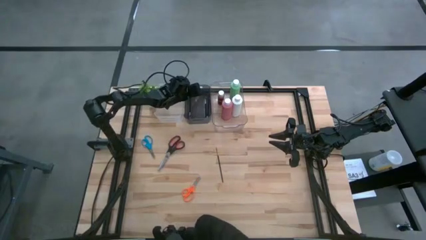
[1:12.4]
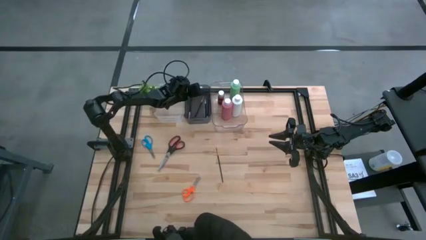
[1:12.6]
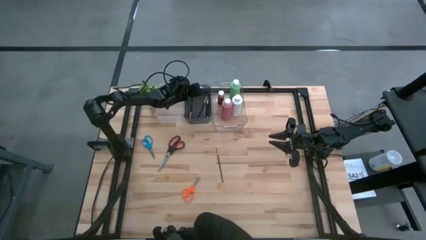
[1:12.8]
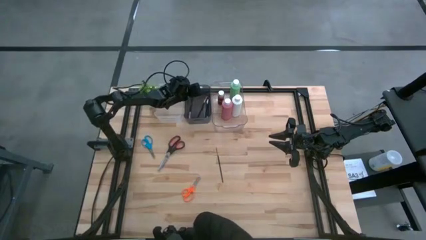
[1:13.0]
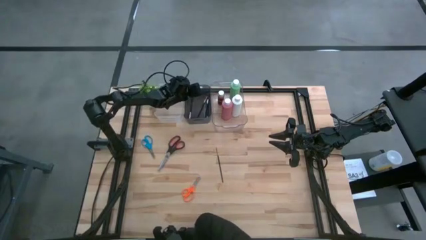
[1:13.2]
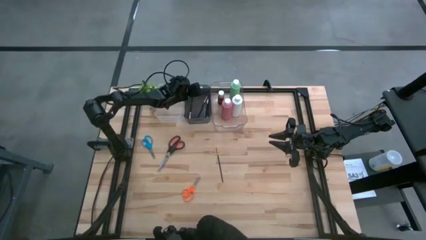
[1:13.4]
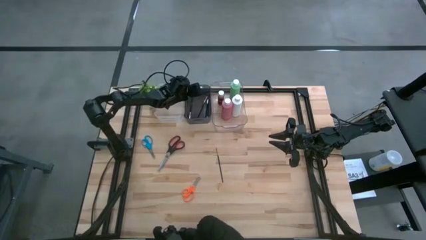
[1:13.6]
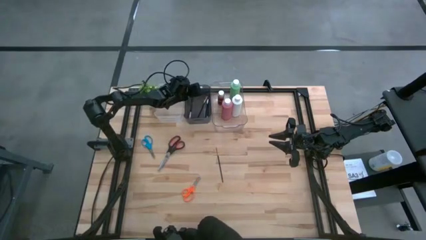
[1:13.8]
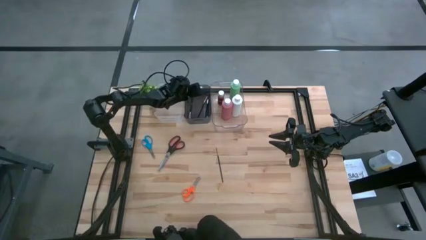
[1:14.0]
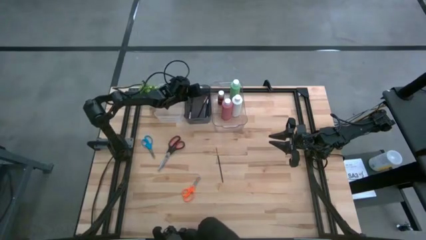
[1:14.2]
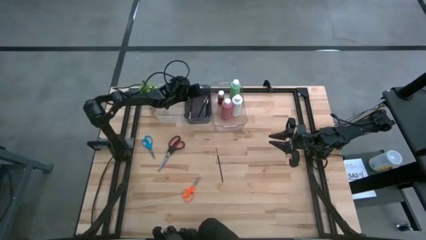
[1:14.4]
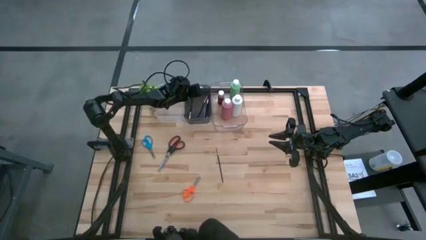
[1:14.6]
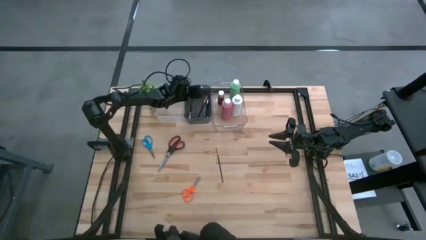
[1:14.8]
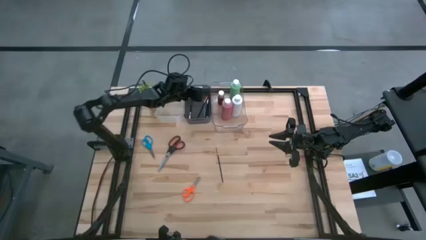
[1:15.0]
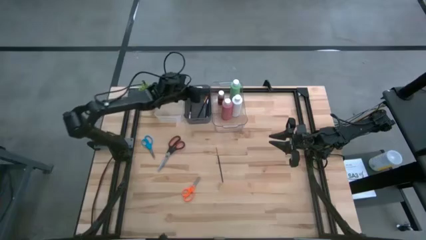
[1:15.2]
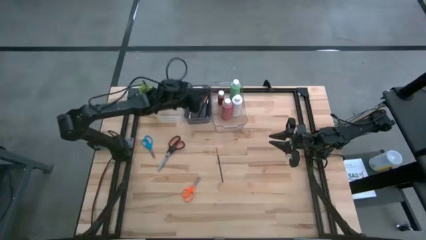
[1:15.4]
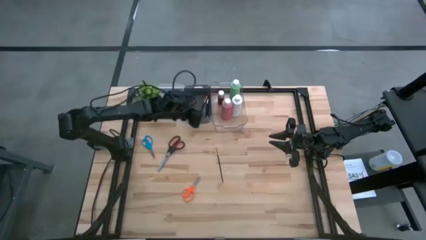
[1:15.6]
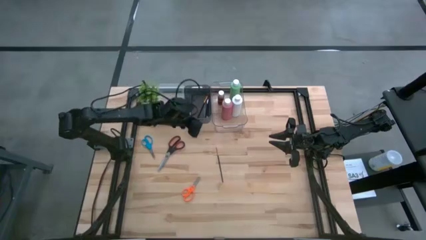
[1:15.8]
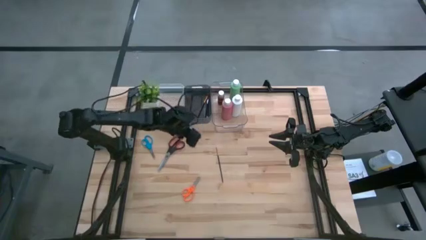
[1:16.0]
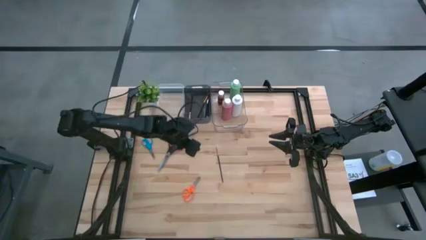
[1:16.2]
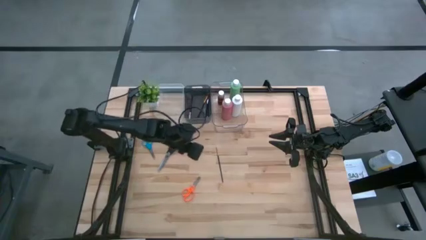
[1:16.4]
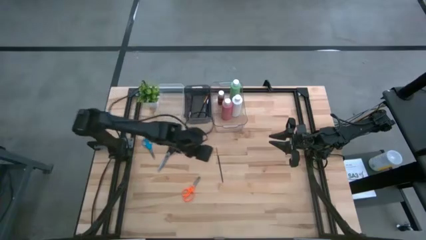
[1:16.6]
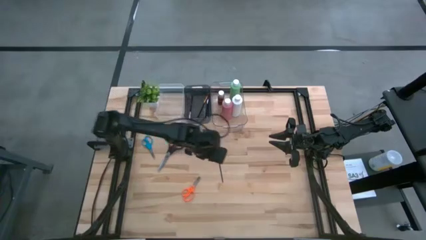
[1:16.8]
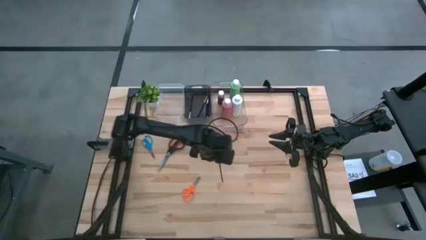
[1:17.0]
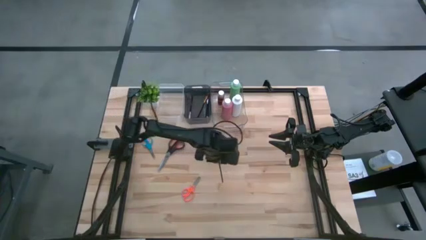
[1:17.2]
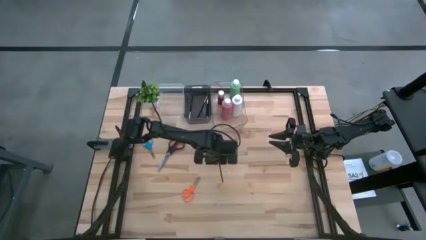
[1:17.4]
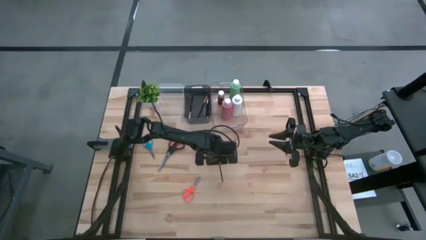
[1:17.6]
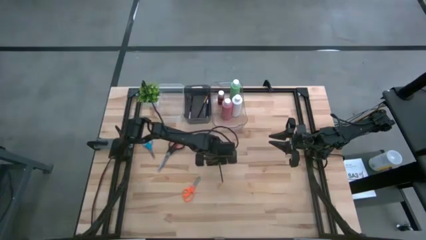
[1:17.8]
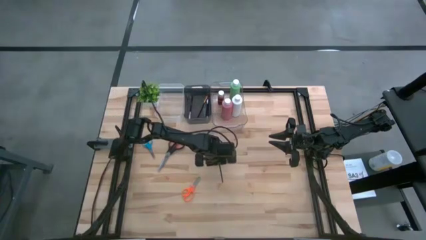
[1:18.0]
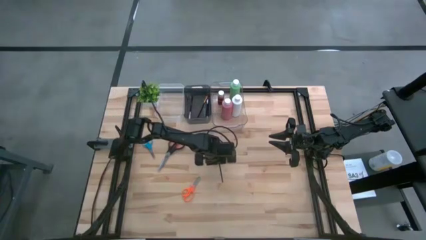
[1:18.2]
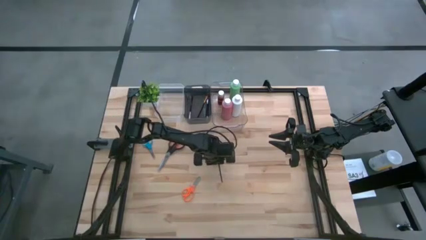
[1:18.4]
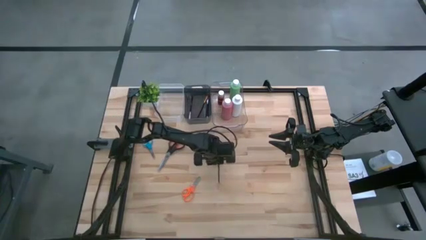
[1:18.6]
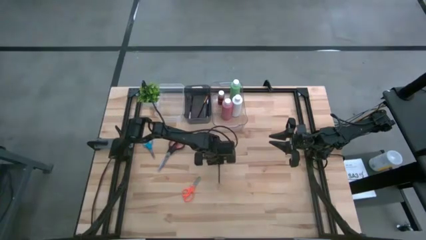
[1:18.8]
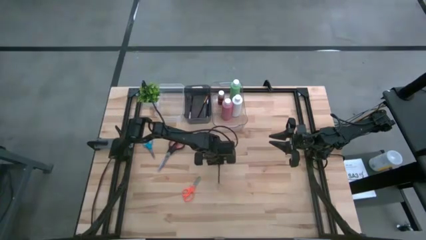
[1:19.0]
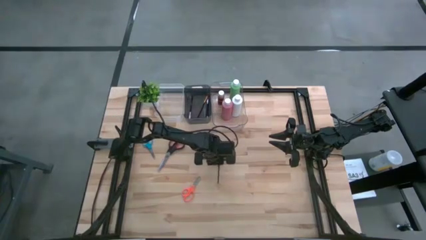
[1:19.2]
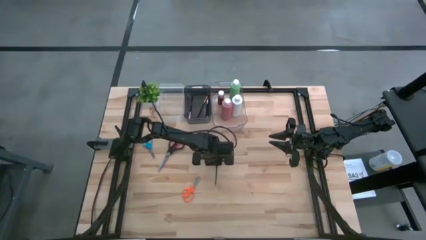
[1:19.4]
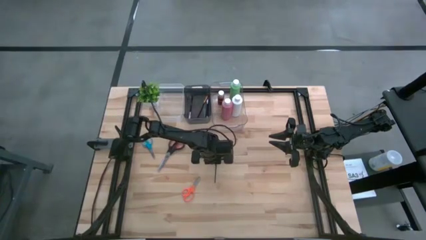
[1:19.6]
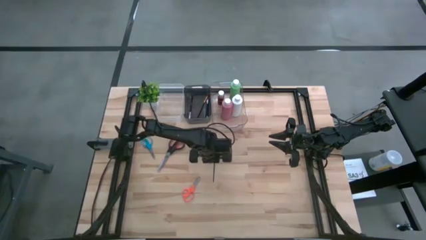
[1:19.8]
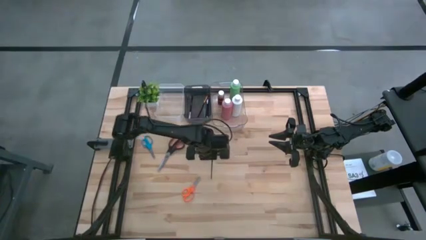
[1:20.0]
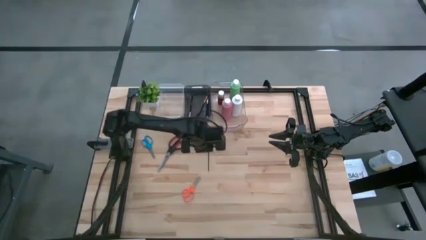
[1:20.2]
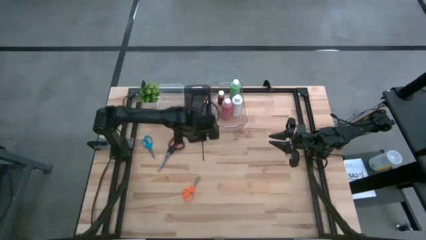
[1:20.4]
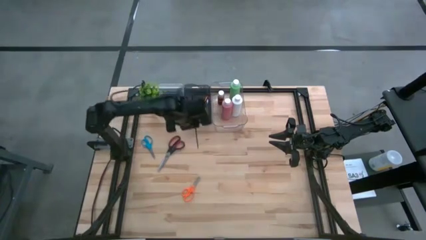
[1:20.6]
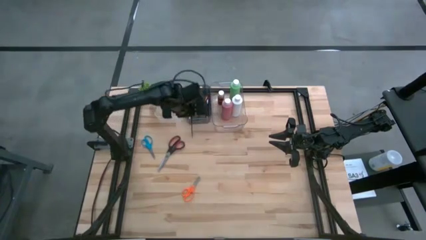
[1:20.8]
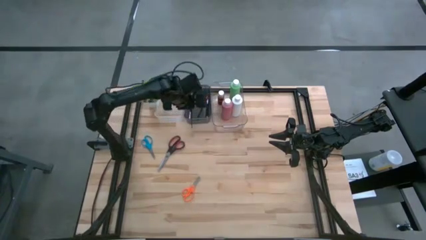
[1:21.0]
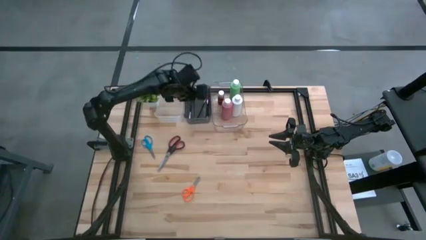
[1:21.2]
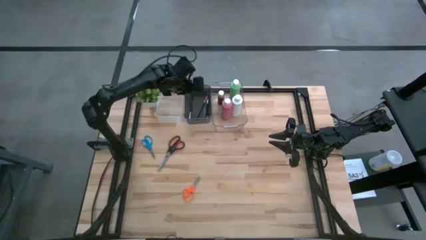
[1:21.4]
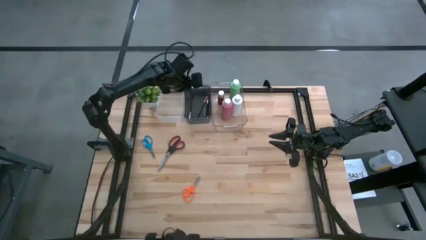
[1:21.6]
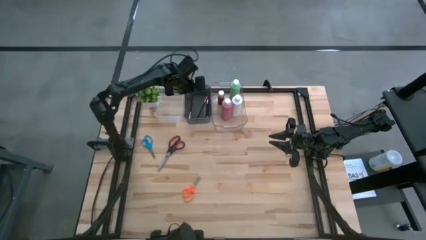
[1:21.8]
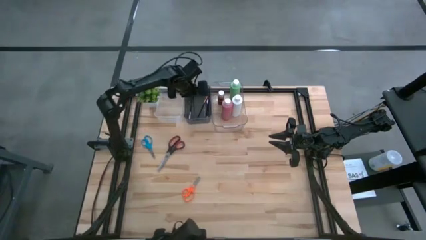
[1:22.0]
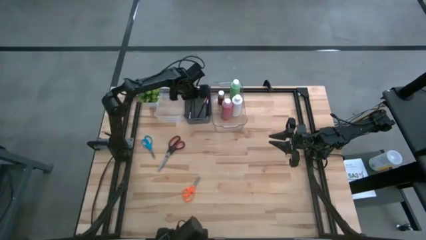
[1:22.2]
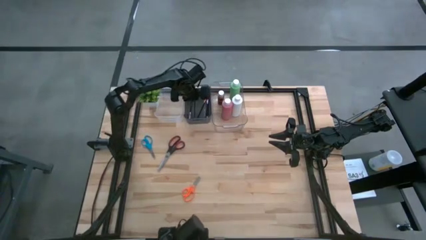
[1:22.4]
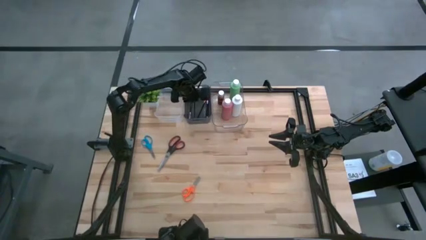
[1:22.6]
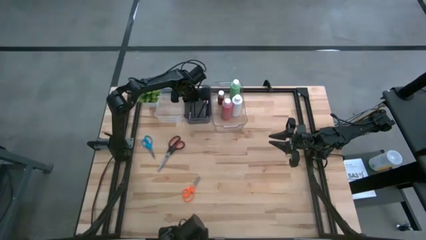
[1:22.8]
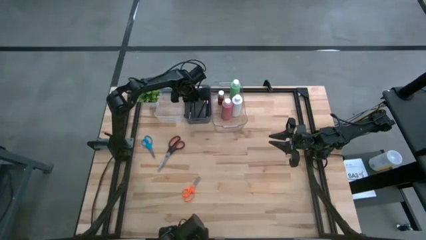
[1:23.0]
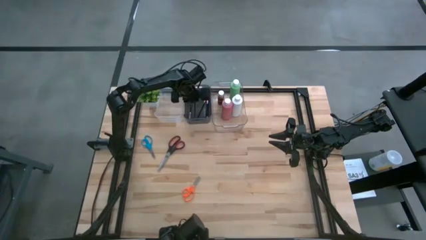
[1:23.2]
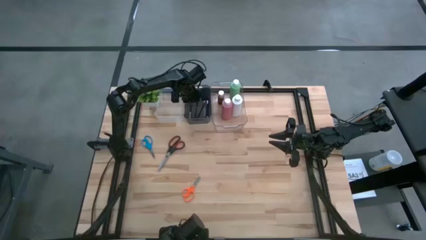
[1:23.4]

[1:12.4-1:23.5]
Task: Pick & Place Paint Supplies
Put the gold paintbrush into the black bin

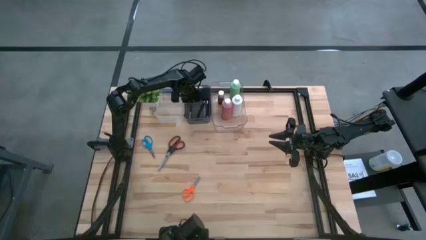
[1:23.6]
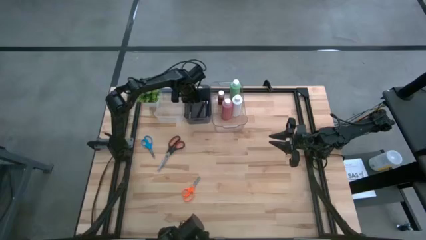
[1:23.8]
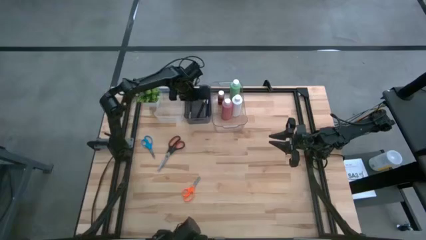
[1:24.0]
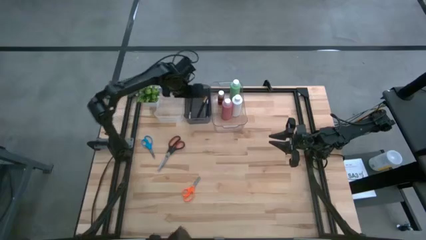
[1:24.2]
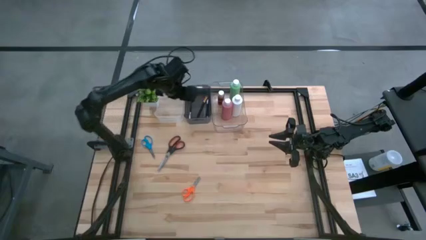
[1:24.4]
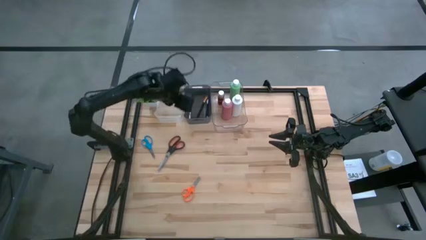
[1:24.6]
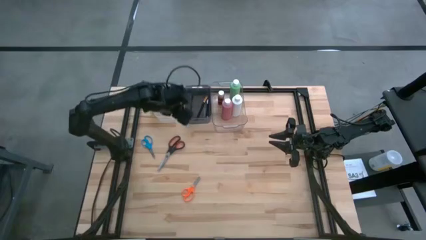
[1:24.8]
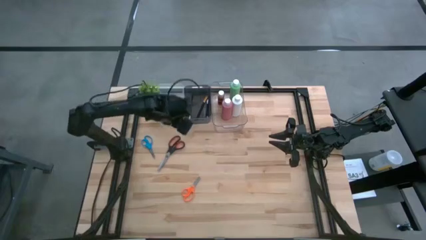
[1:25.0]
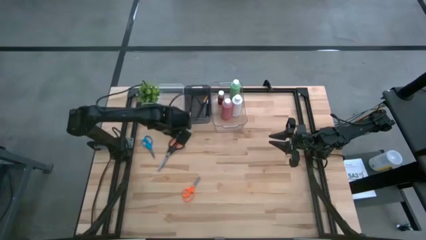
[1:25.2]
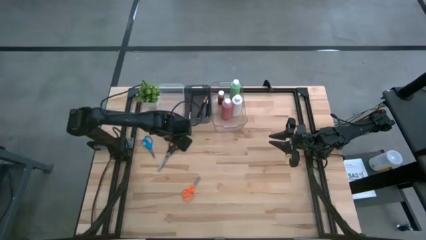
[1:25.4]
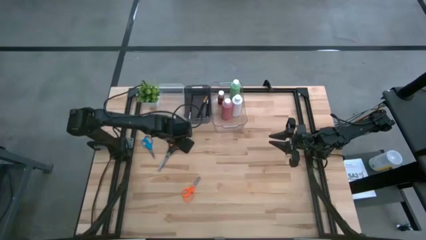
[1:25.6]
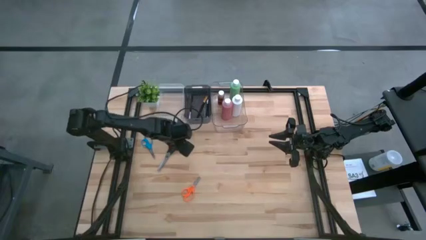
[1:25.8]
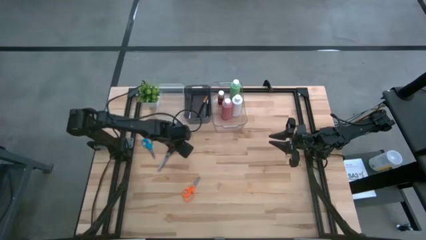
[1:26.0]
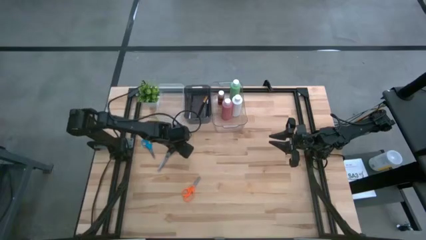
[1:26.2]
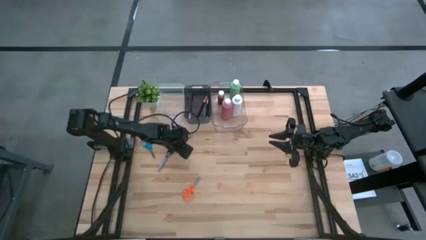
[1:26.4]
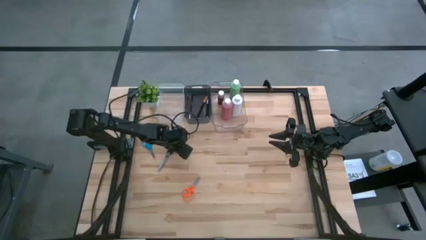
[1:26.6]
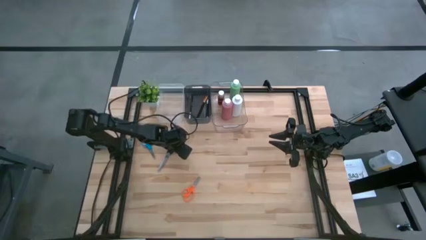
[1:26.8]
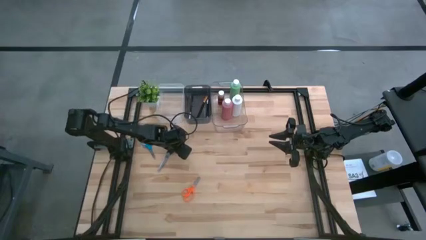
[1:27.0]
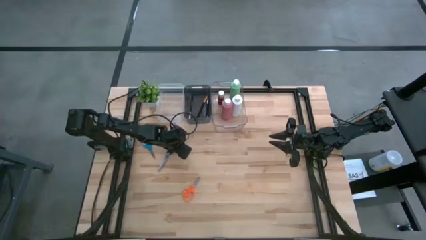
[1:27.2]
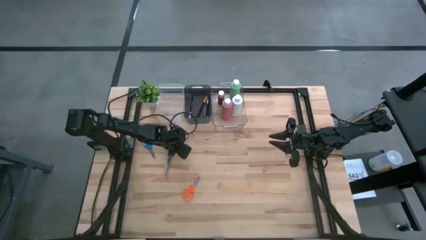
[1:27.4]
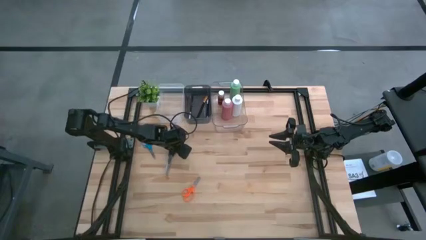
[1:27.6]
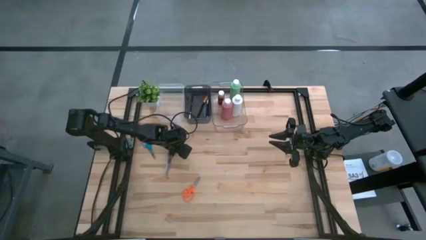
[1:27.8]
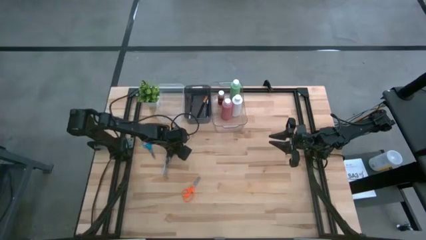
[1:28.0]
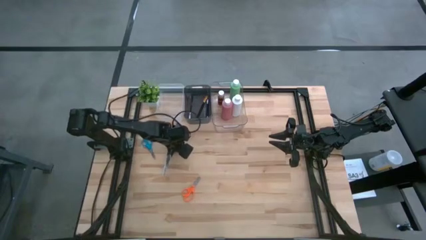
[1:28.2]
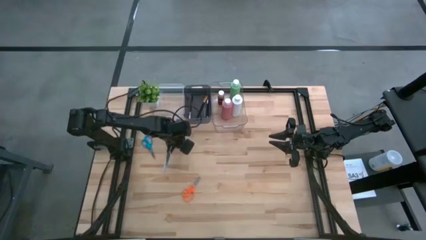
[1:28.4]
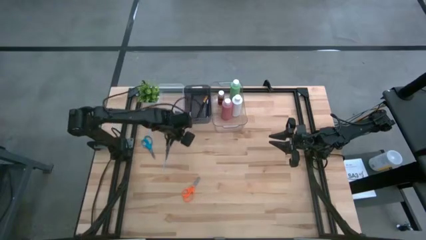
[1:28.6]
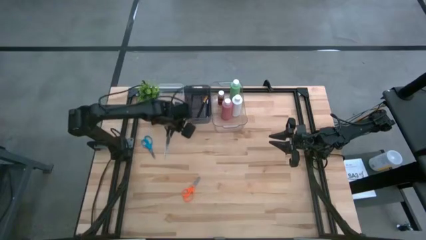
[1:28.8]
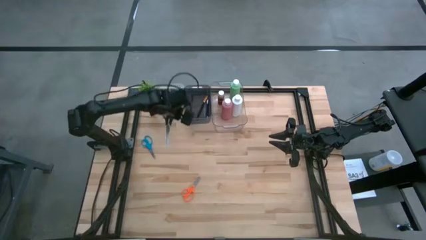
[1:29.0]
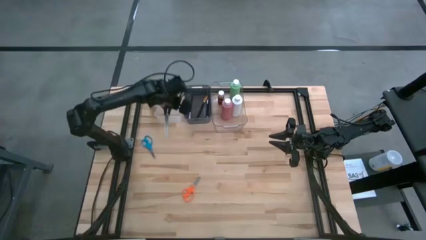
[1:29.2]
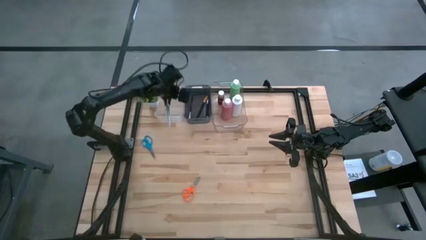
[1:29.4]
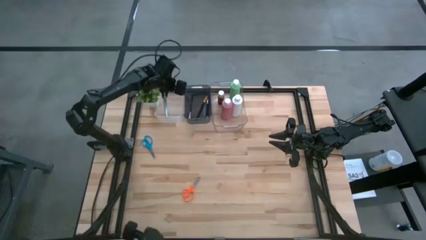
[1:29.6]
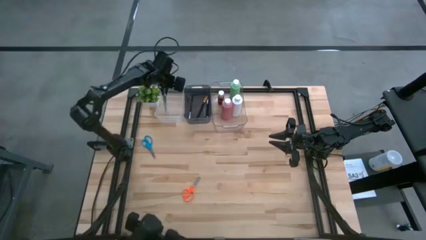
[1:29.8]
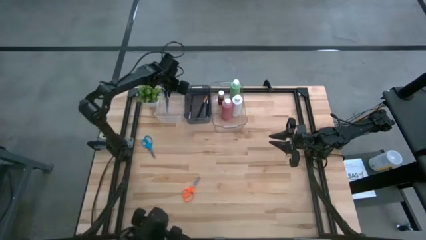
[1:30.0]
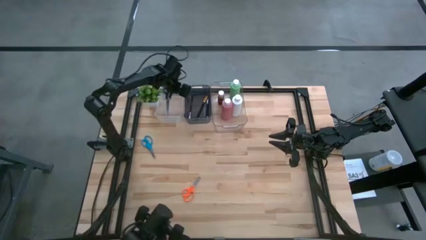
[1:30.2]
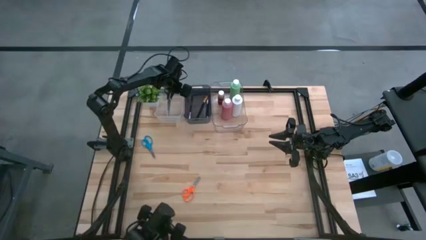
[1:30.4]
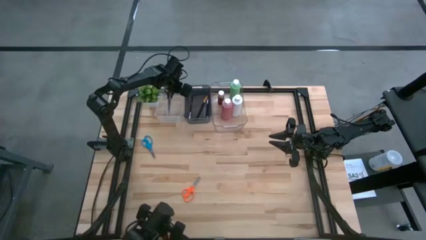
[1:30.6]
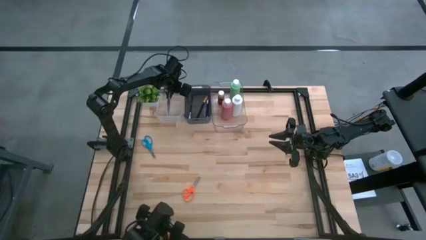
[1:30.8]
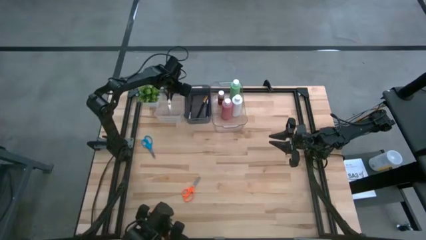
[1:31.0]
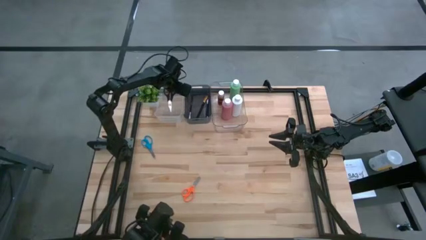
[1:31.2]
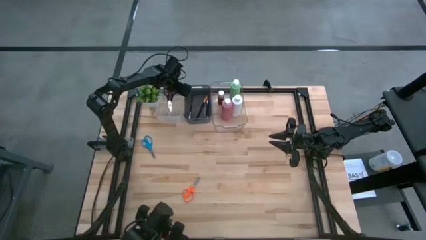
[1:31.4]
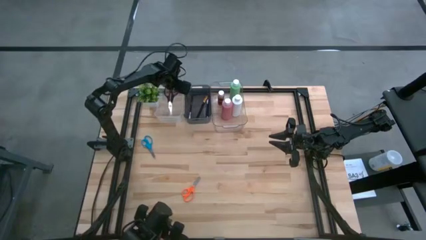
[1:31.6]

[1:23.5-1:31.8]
Put the black scissors into the left transparent bin
